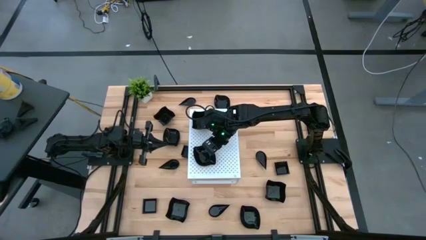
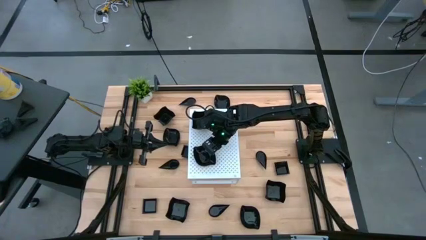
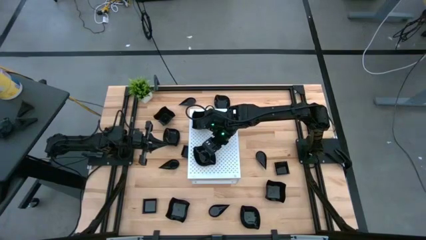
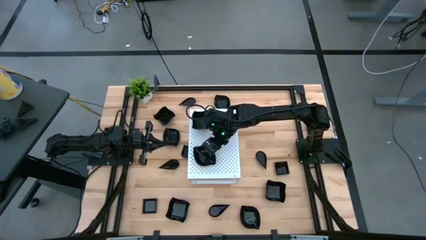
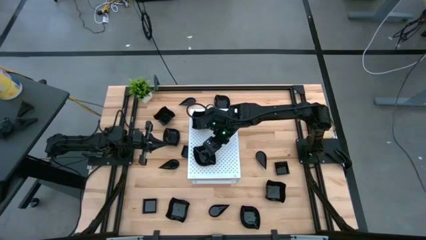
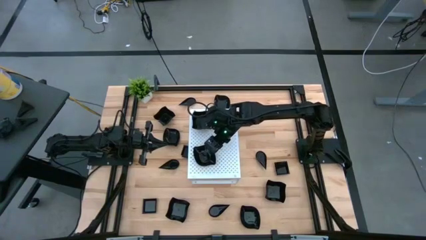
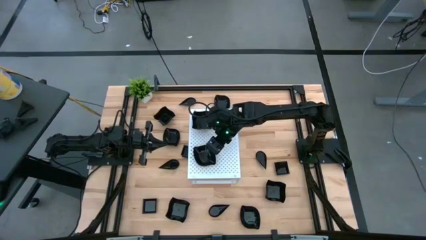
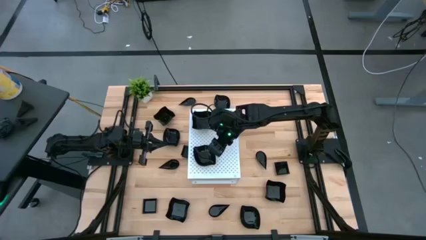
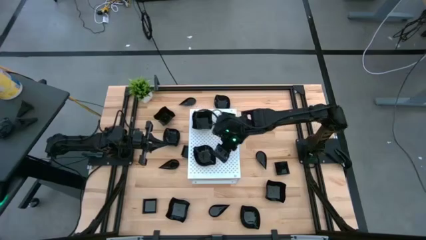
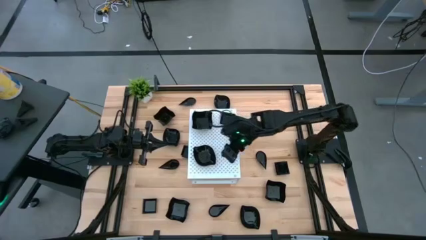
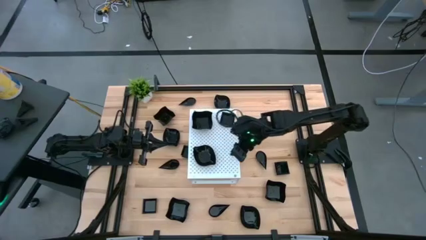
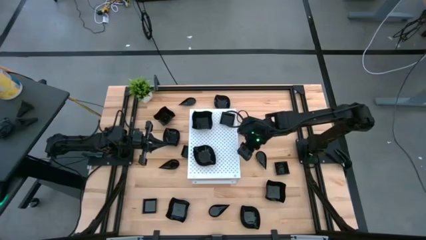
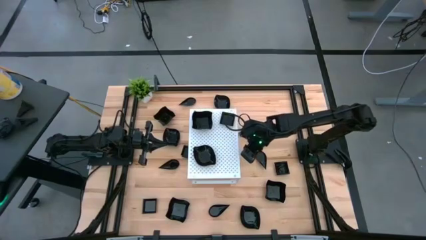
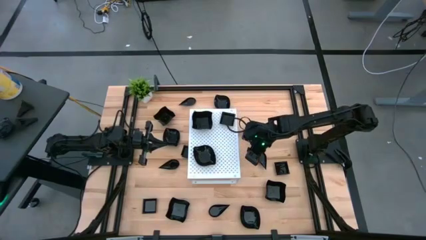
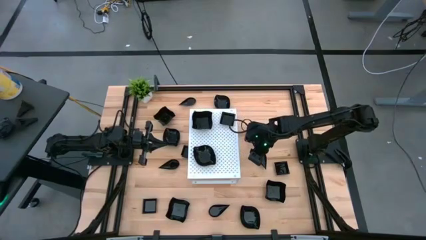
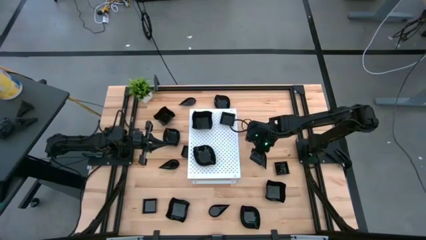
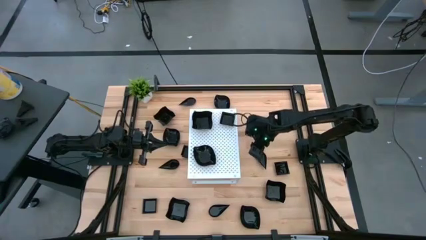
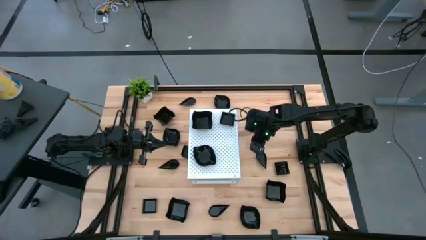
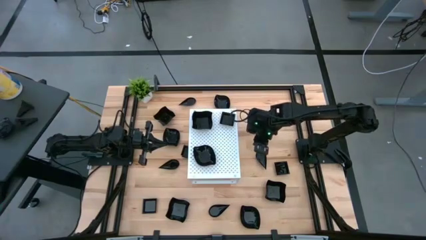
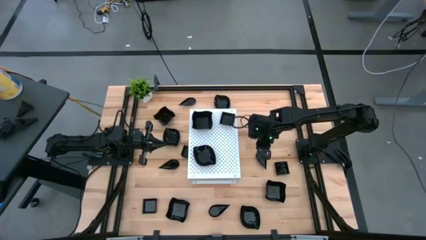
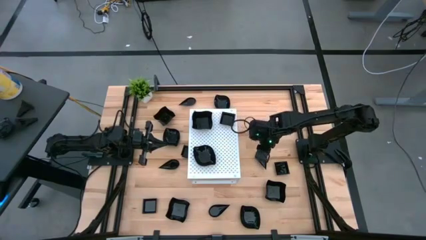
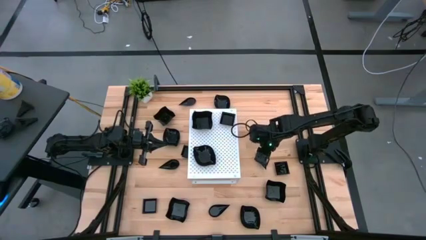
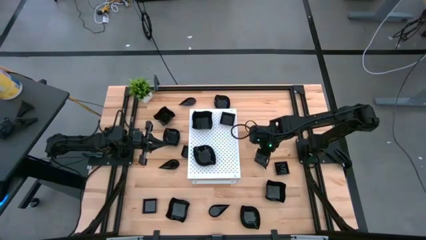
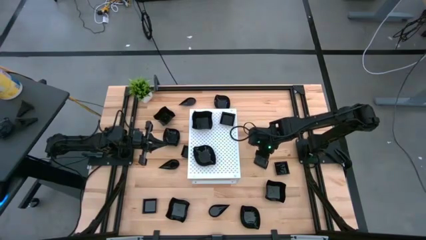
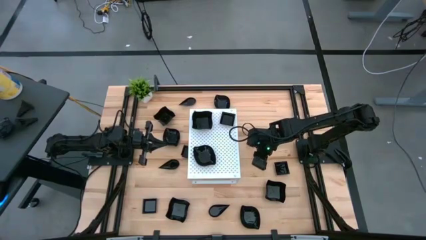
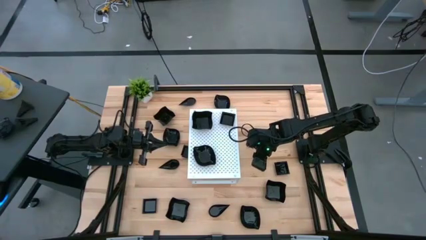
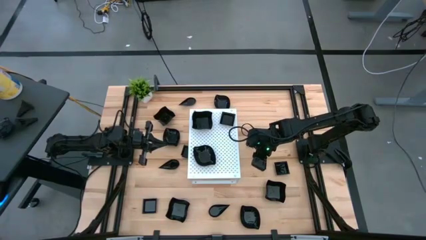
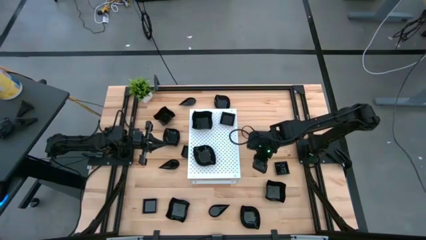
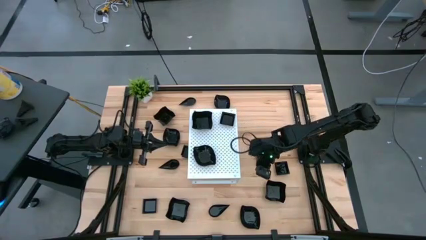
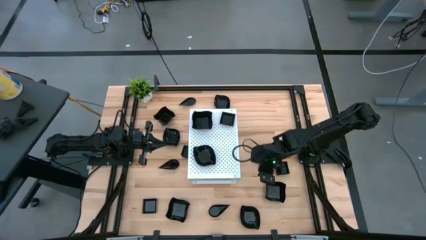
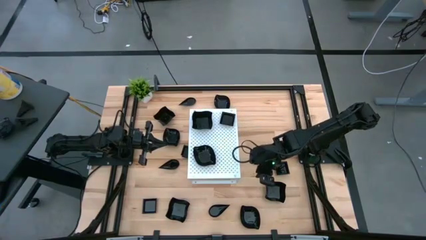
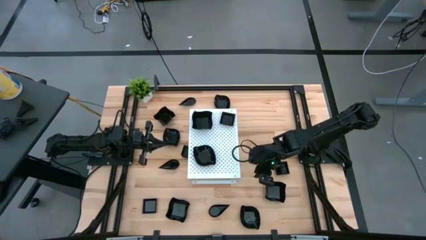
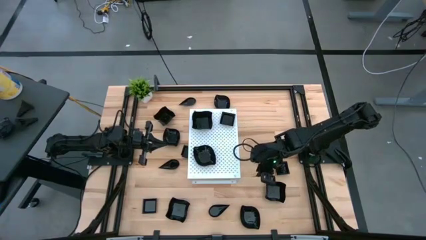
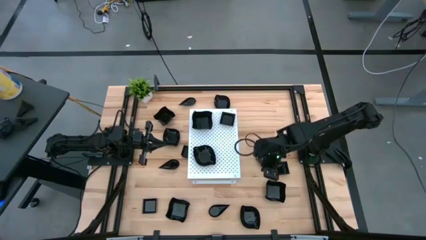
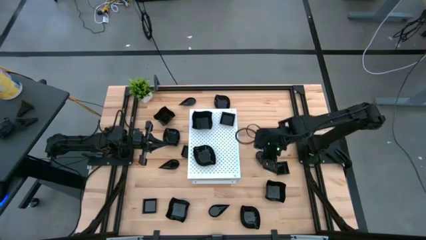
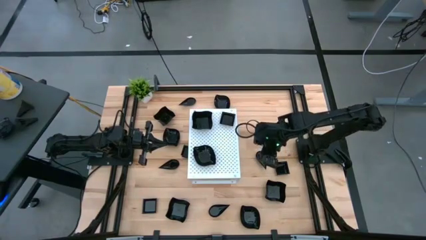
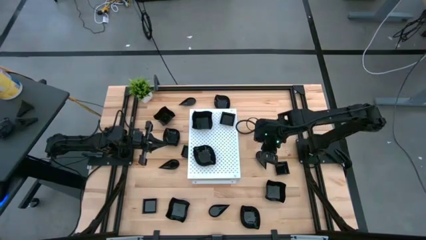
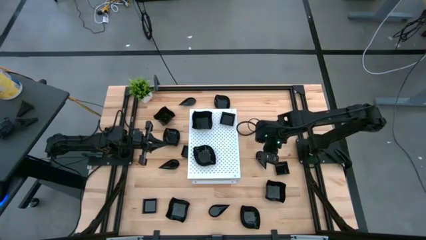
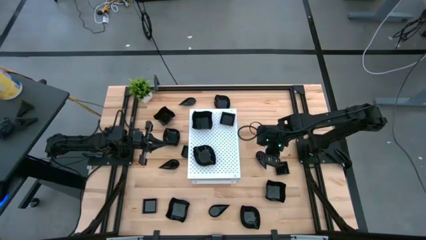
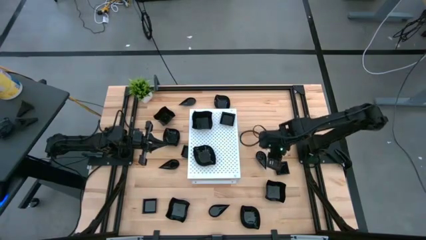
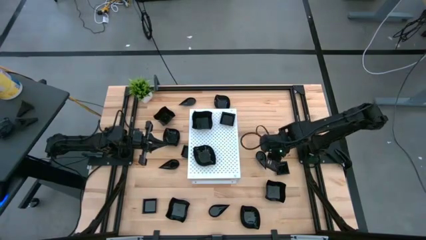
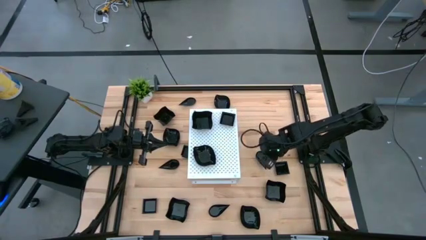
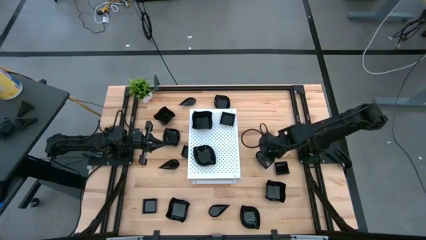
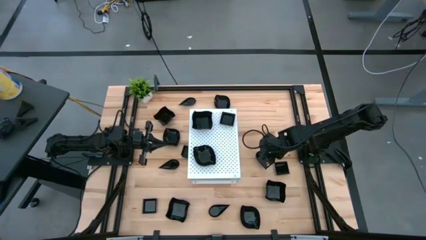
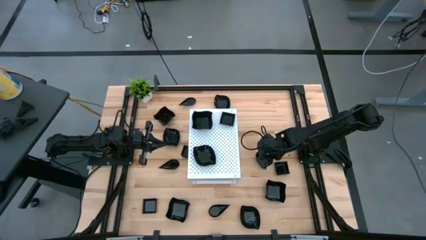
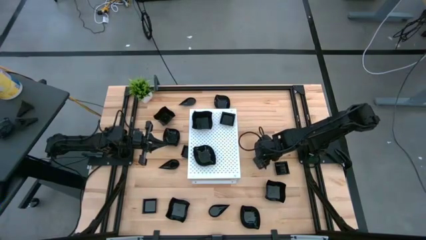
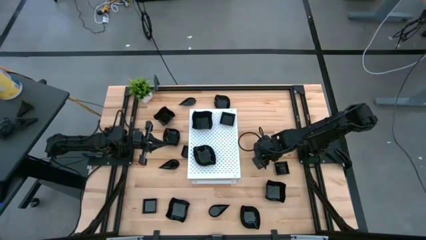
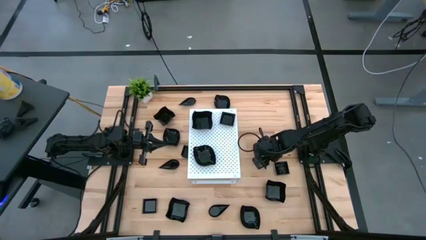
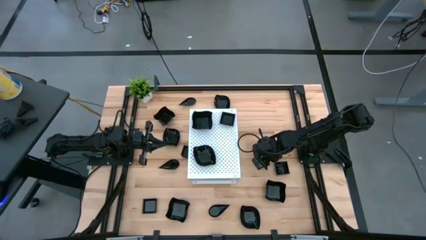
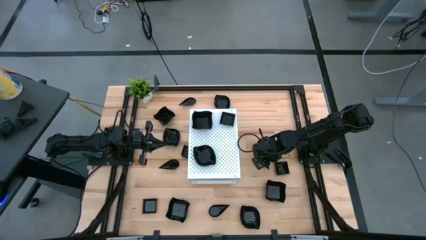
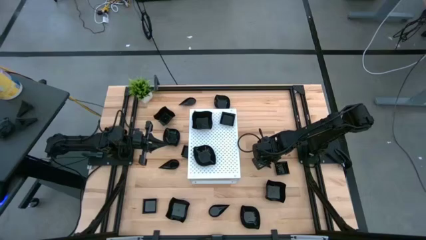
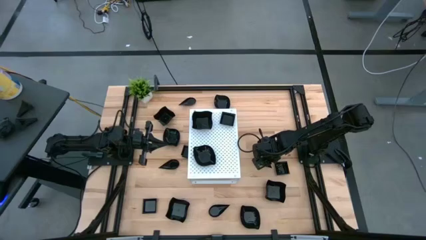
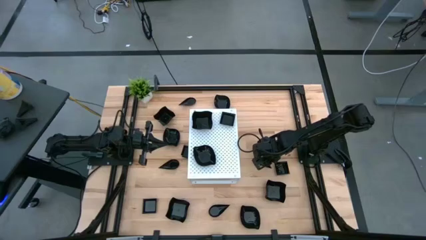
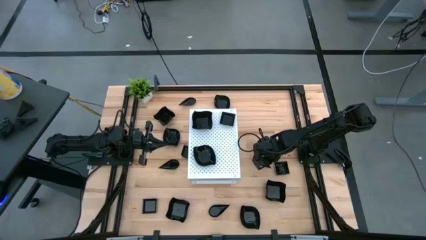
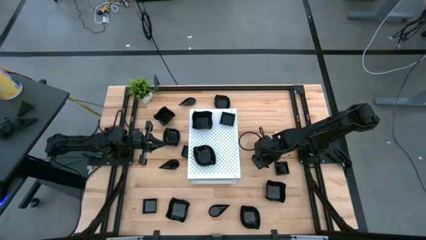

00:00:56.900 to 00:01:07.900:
Task: Pick & Place Mini shaped plates
Put the black drop shaped plate on the shelf

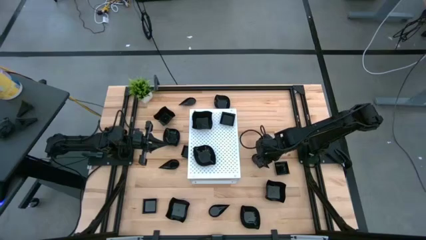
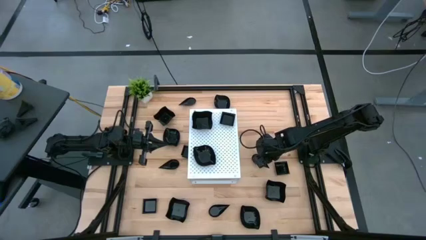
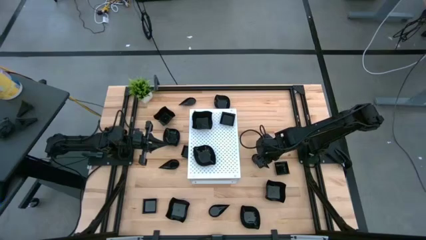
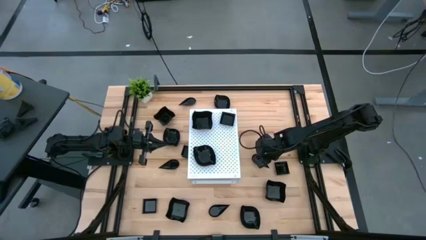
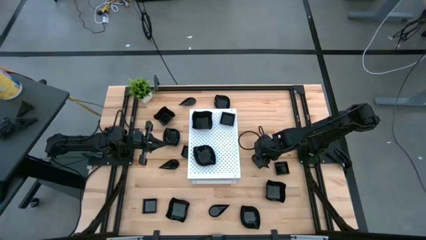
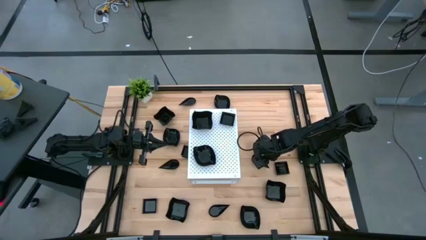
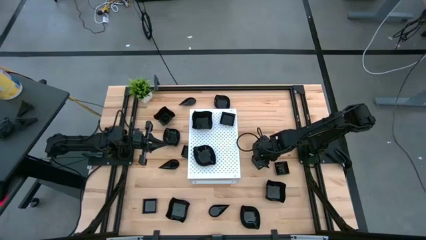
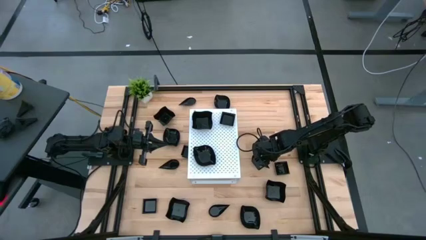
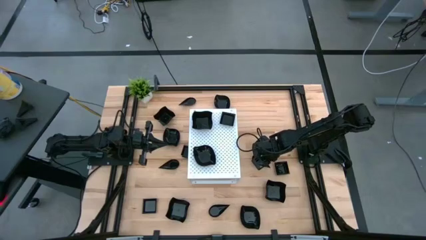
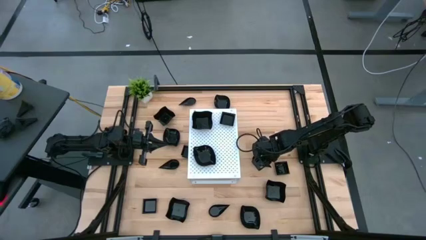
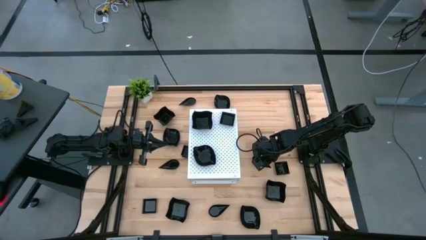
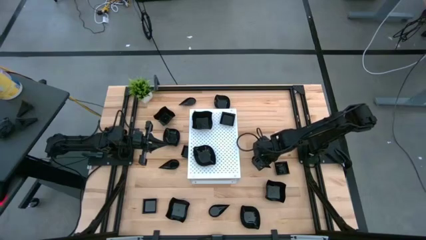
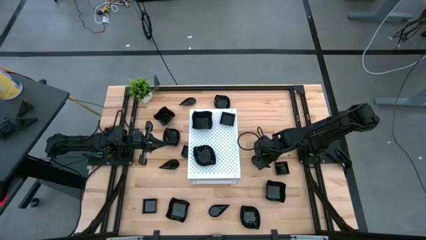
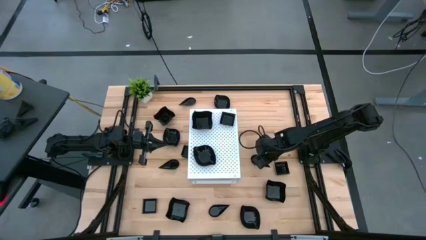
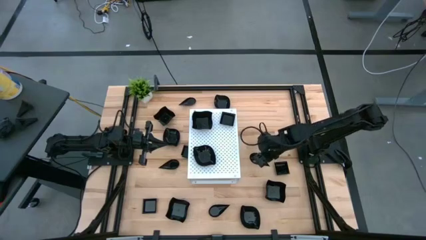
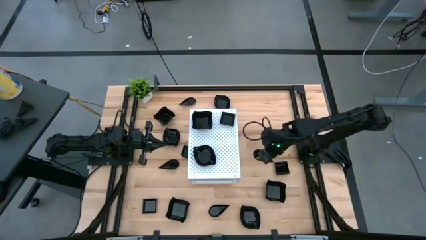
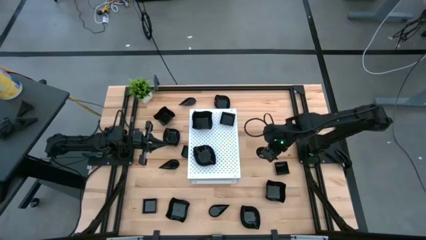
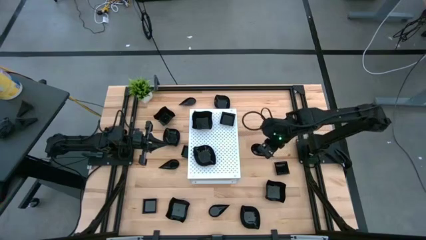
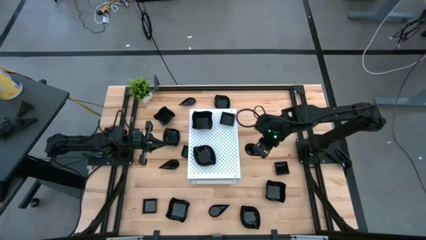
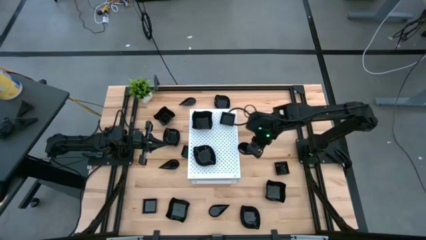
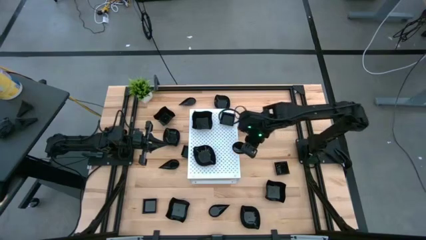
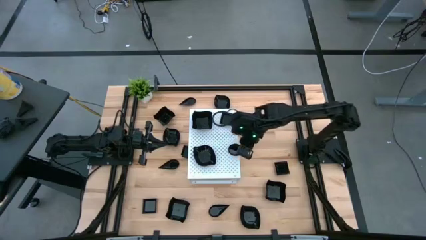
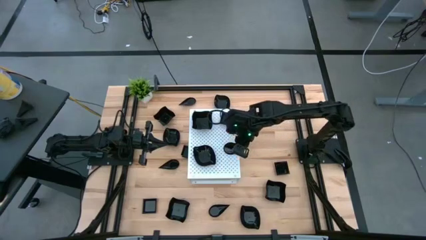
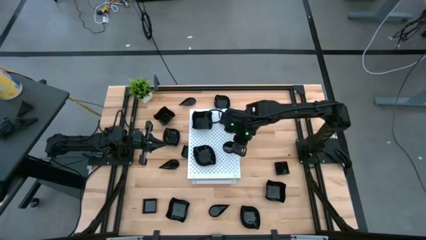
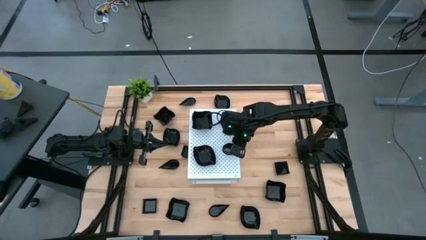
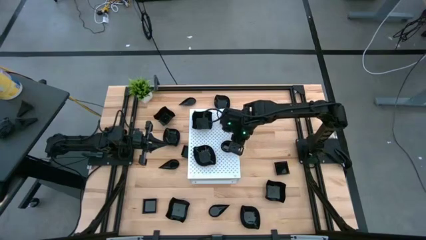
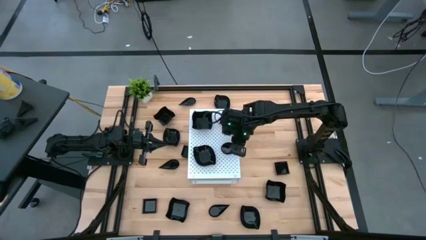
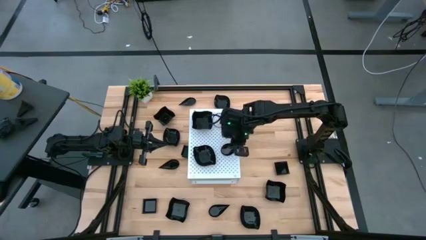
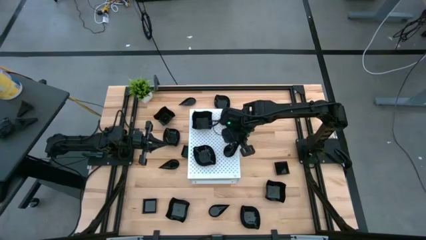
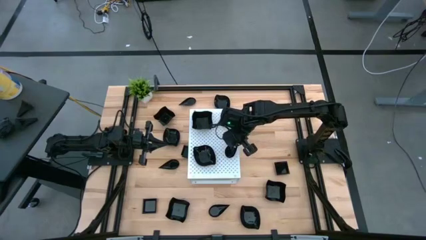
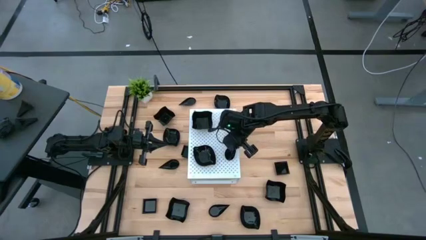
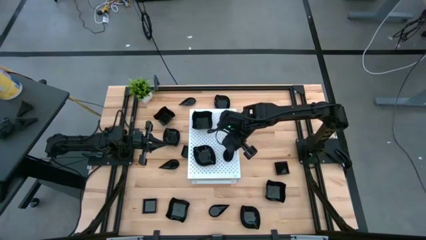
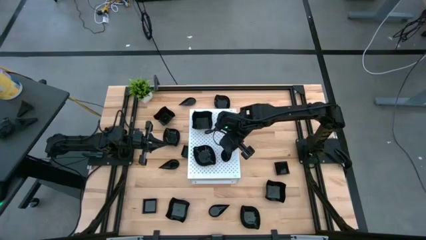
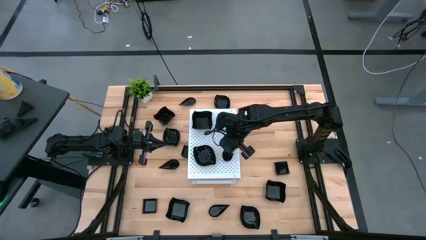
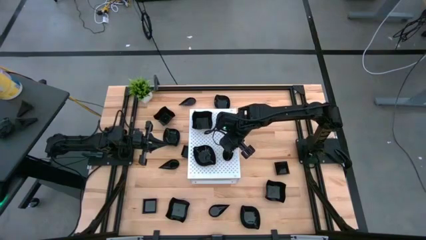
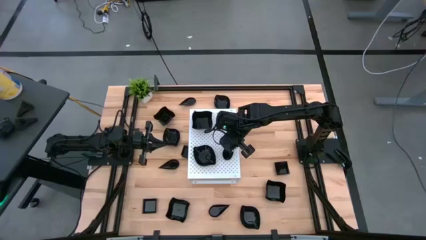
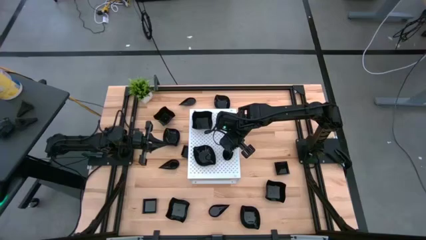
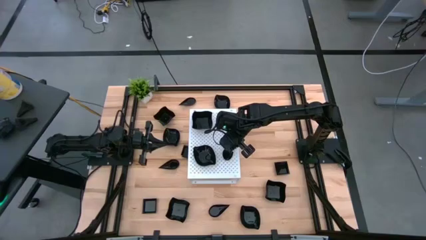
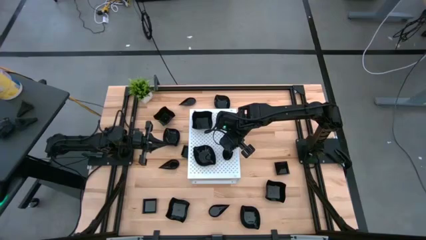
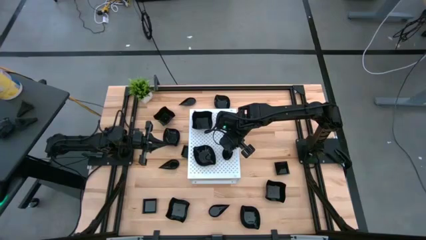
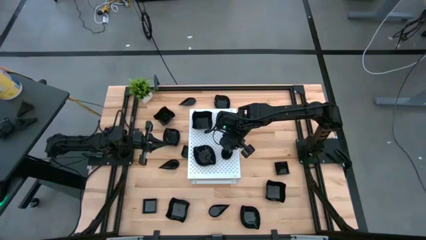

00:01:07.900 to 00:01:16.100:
Put the black drop shaped plate on the shelf
